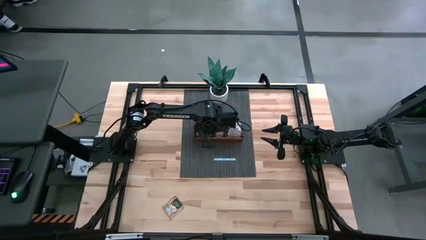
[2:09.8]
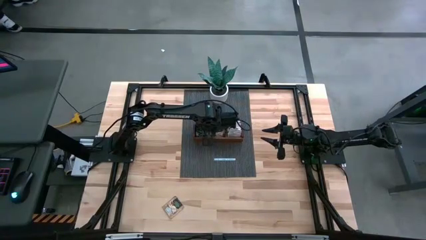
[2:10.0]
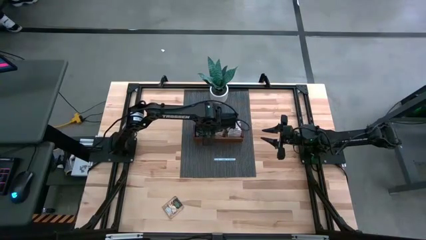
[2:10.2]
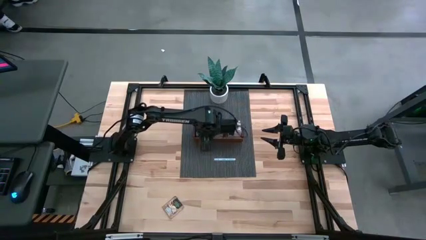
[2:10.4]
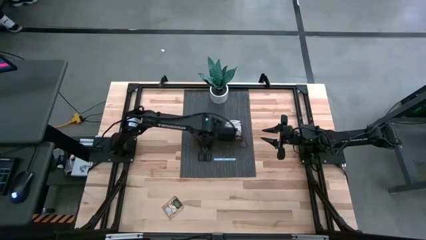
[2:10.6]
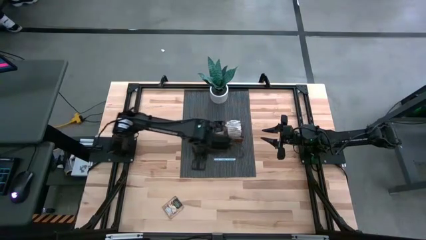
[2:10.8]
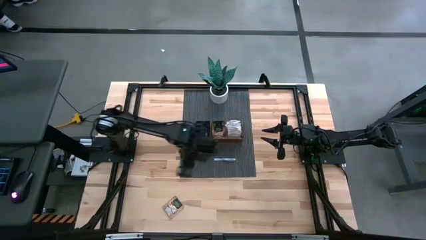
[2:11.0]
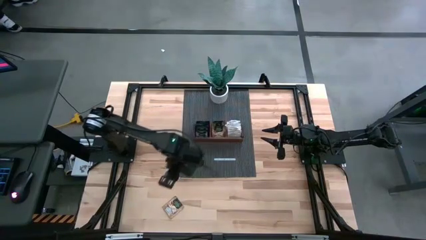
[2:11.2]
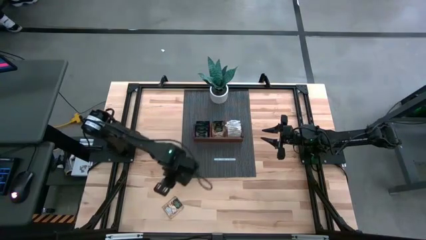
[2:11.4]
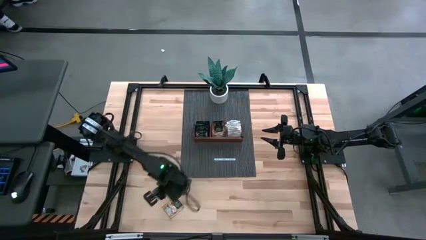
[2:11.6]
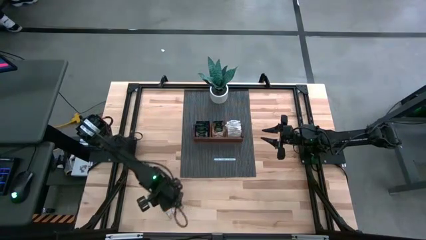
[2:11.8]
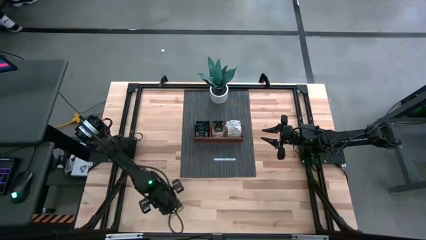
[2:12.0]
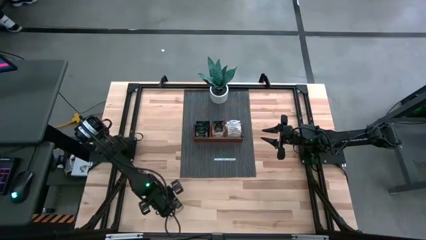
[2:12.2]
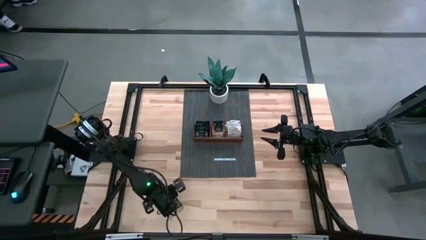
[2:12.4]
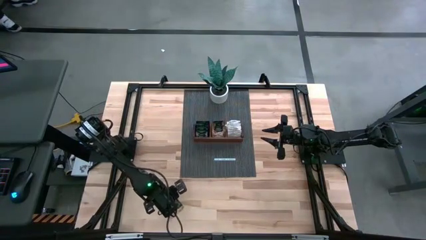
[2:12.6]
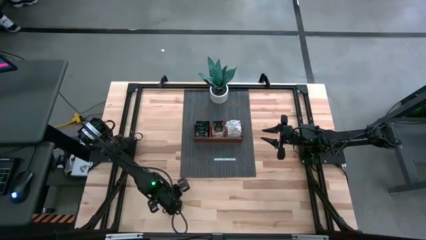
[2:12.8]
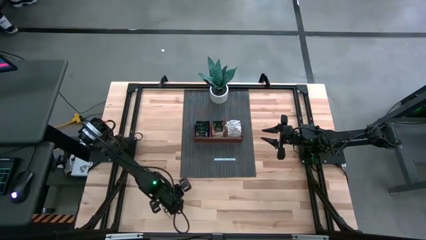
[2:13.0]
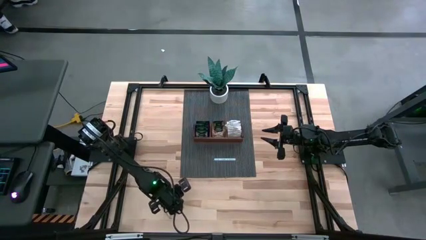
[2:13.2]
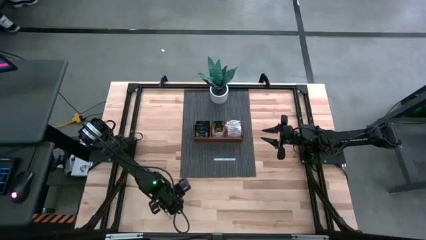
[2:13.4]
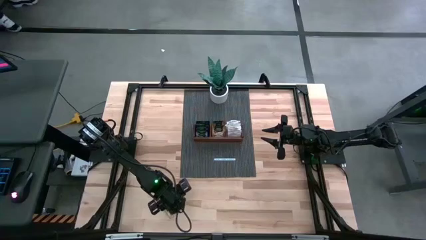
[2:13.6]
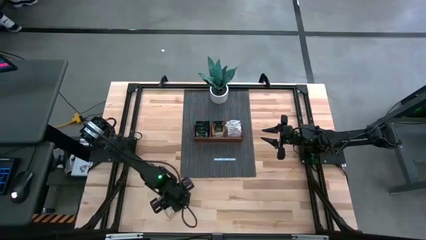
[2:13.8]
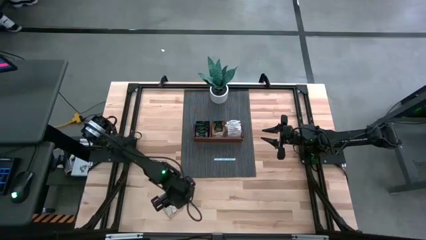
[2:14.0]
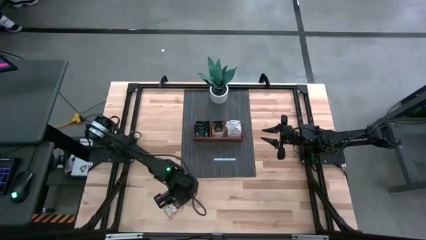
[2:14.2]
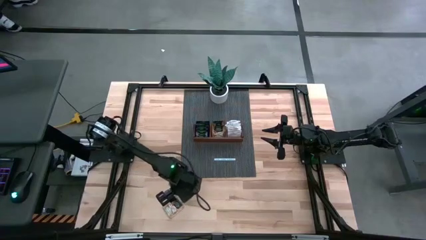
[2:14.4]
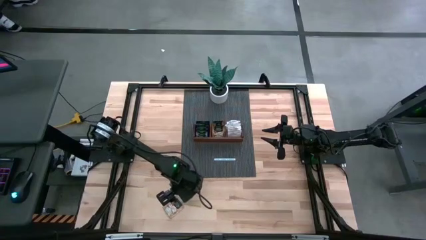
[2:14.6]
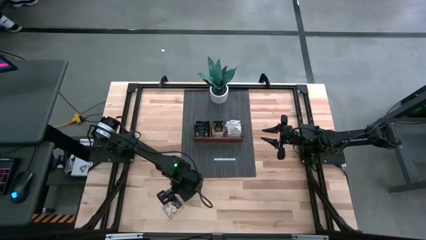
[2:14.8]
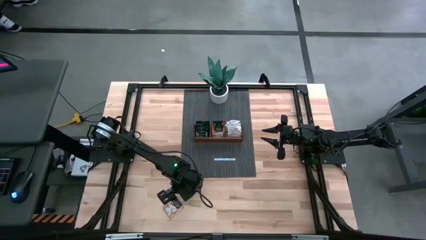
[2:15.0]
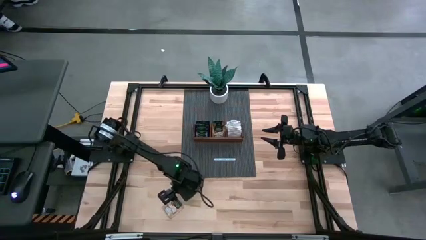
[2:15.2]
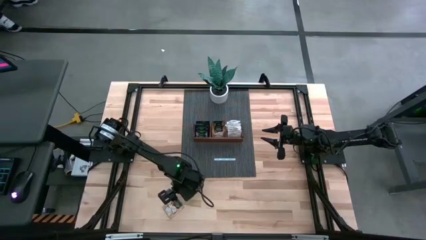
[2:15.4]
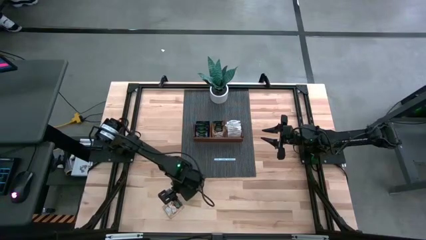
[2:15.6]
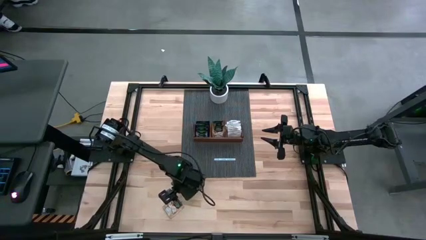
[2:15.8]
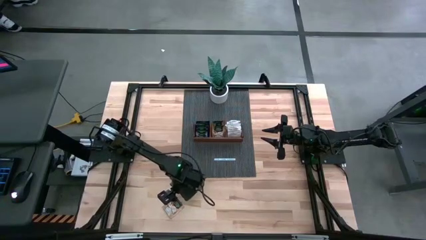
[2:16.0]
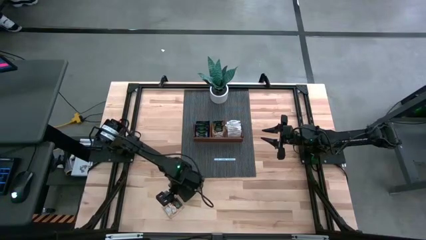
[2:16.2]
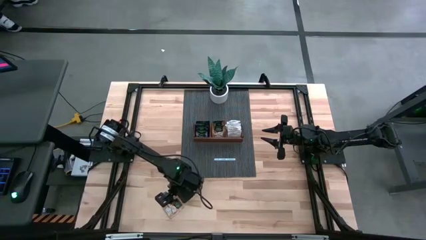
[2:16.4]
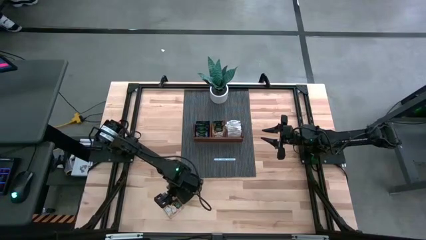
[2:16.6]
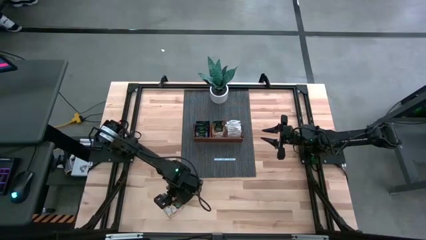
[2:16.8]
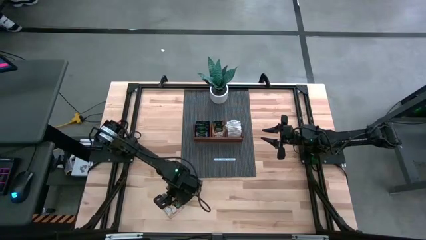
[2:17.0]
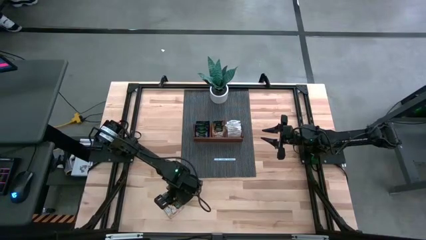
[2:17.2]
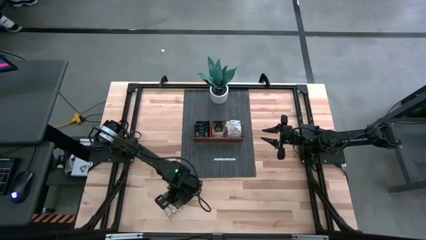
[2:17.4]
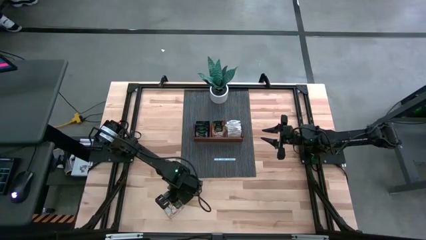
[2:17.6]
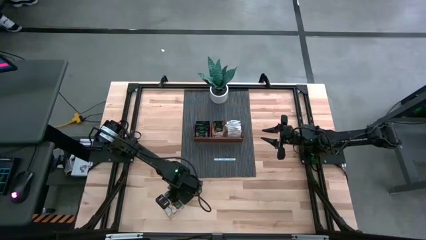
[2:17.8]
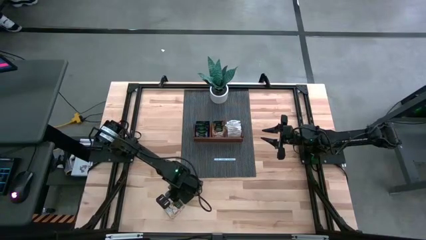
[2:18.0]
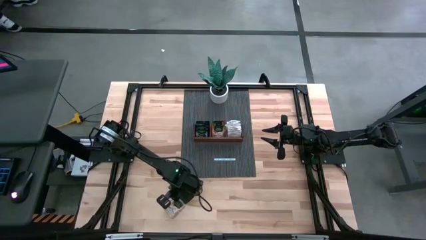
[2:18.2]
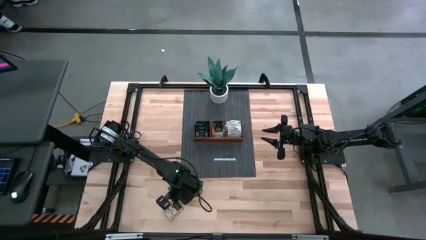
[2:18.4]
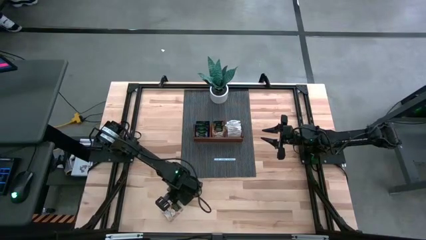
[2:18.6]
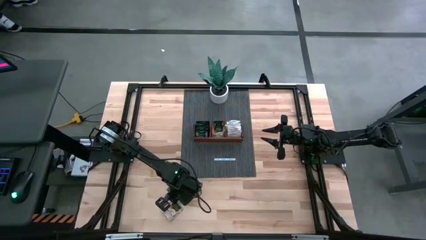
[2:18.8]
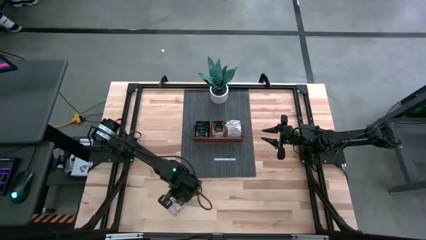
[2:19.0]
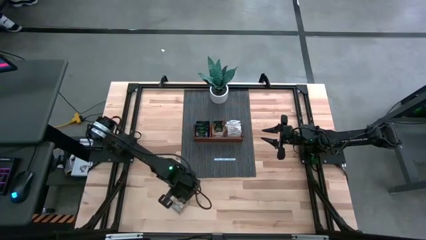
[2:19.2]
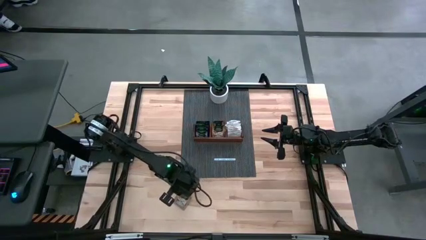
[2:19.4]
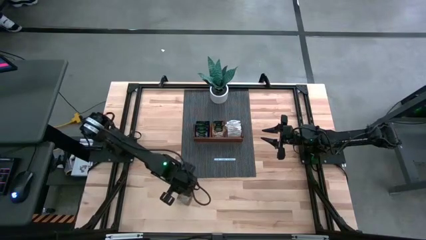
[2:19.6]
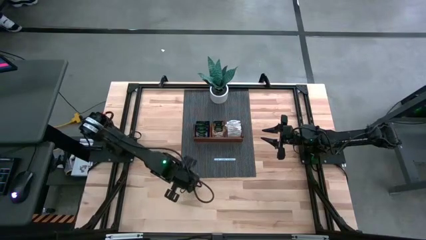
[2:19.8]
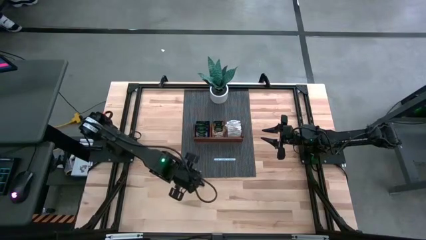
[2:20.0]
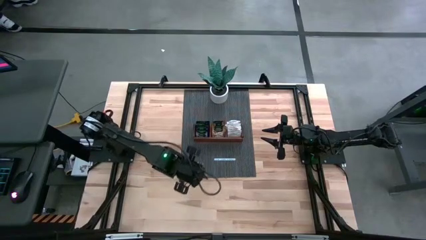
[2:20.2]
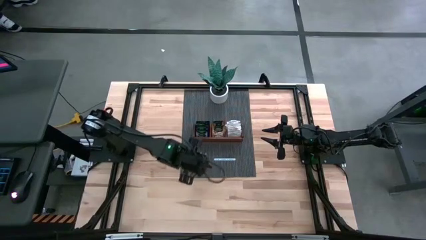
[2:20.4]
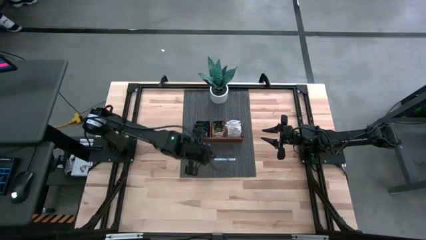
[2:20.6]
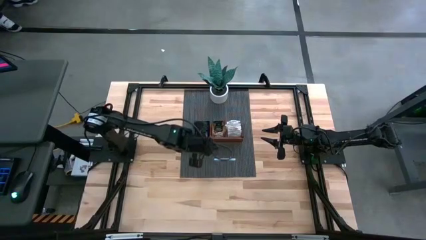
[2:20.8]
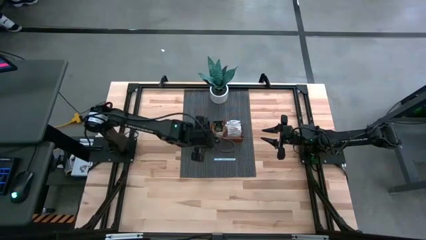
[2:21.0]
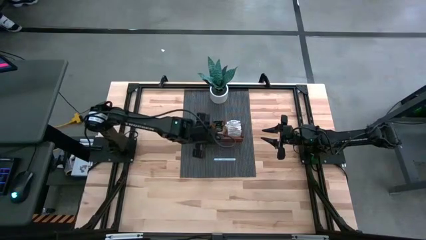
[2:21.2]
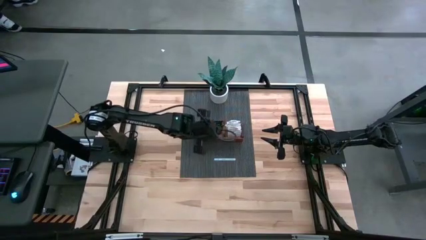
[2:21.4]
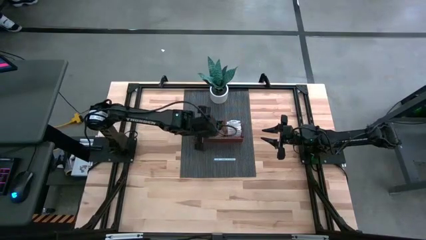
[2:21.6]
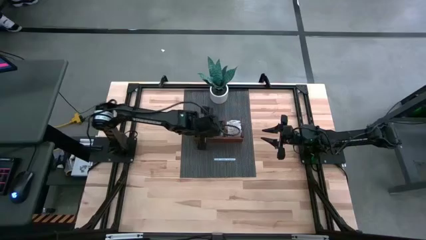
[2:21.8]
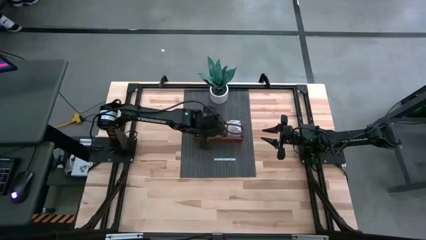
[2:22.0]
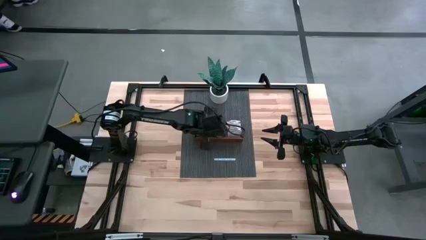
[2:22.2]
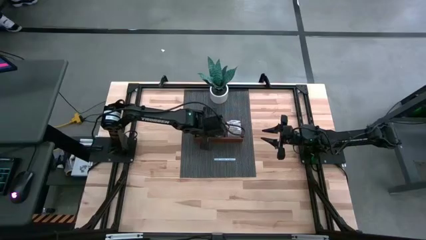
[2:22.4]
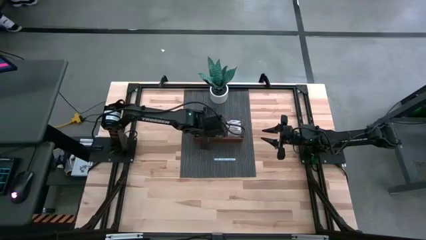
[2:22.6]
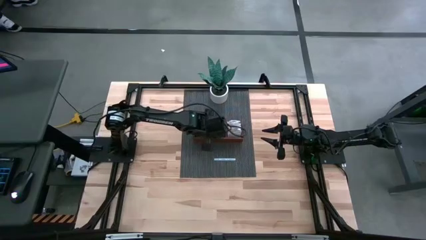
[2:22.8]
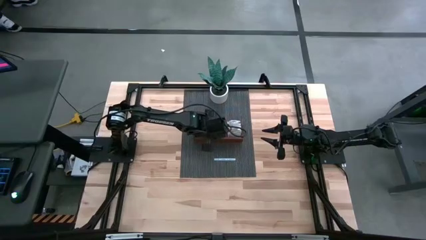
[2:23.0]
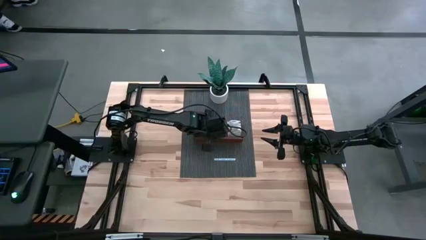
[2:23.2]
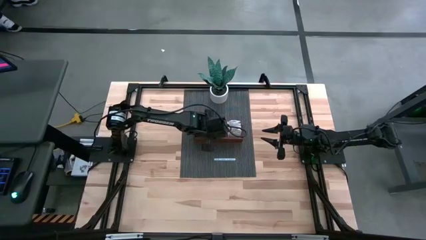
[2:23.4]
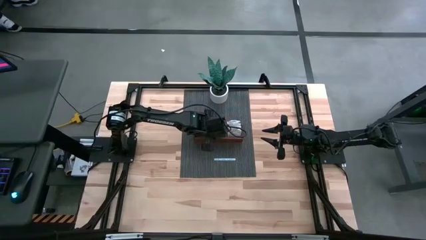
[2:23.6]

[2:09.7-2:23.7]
Task: Pick & Place Tea
Put the brown tea bag into the middle section of the wooden organizer

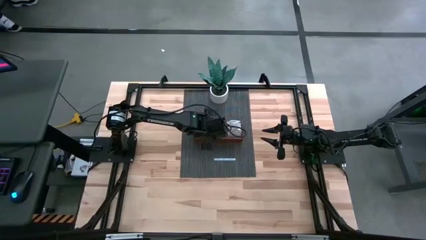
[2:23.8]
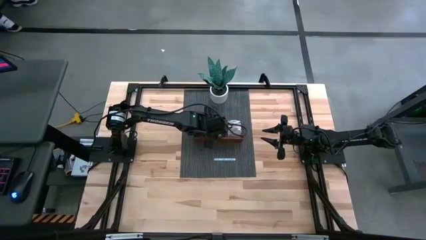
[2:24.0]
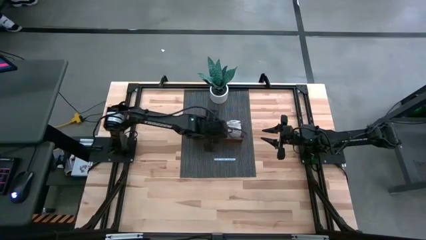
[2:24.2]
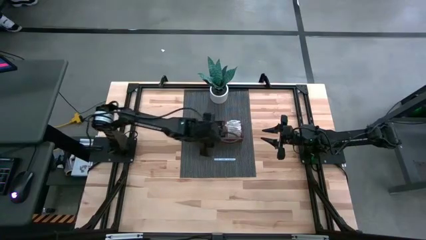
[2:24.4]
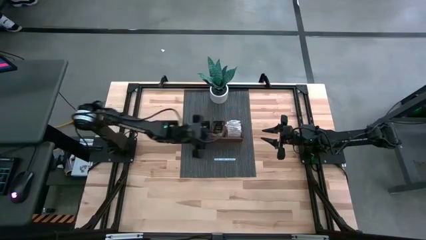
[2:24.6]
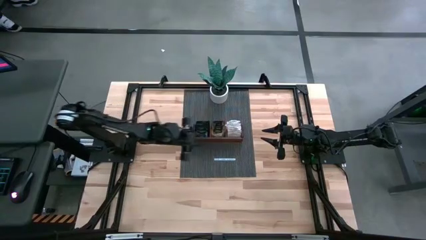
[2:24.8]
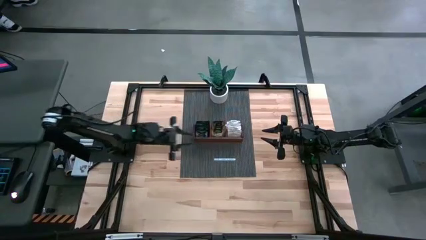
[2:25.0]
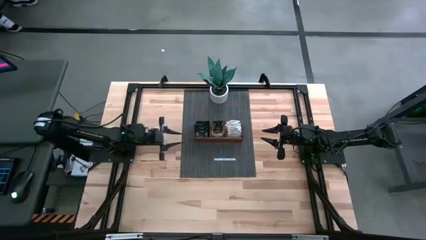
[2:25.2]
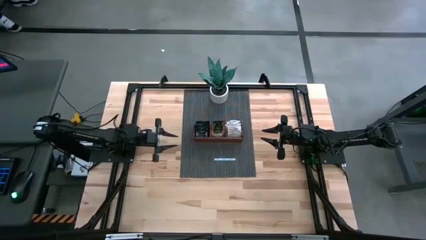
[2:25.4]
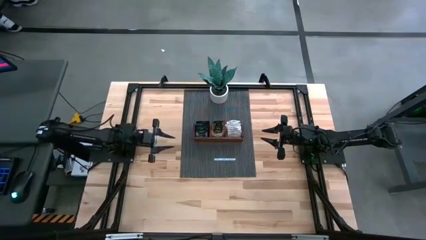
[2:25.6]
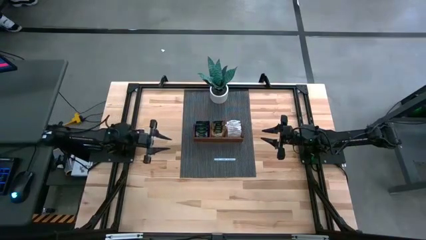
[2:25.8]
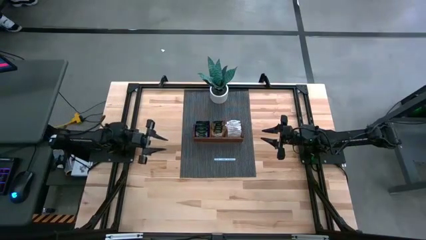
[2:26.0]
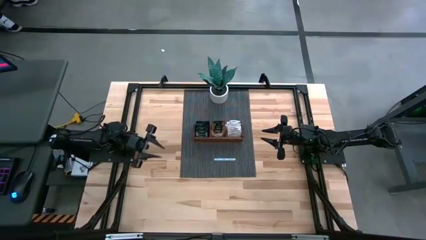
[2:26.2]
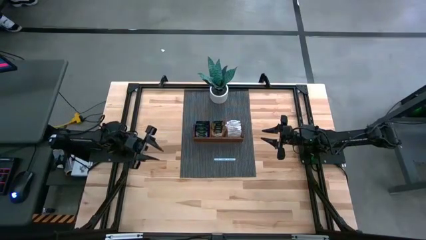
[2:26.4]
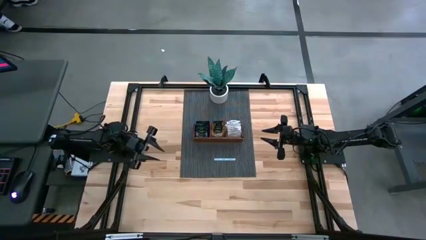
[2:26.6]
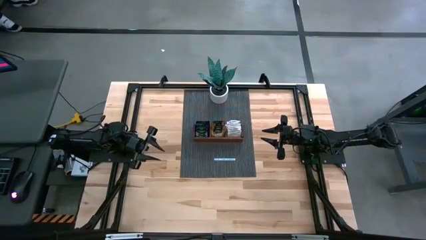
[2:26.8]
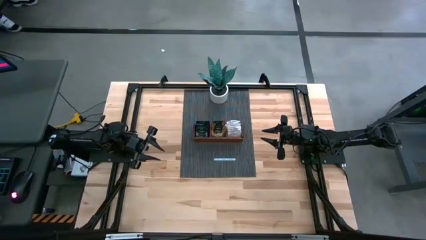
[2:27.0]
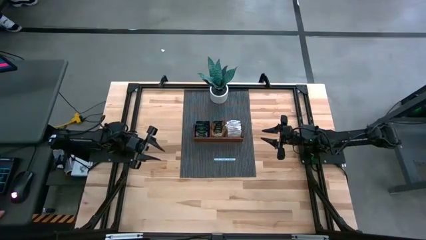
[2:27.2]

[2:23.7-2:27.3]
Return to Home Position
